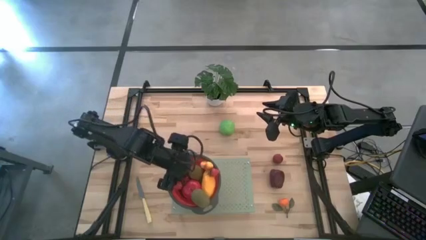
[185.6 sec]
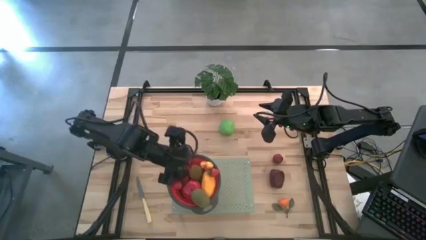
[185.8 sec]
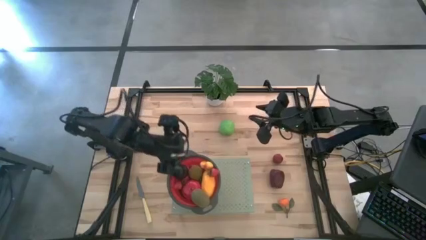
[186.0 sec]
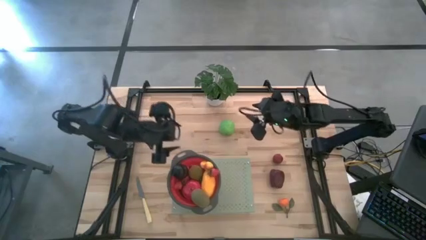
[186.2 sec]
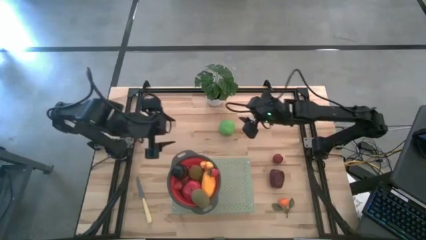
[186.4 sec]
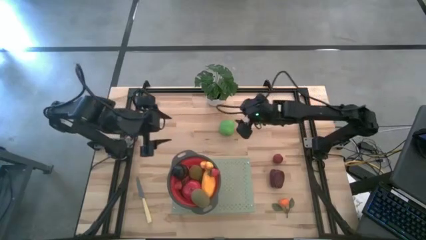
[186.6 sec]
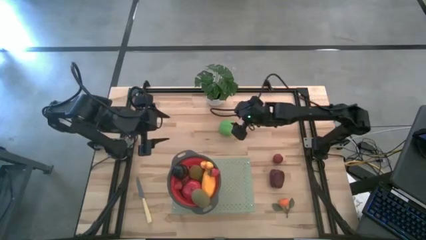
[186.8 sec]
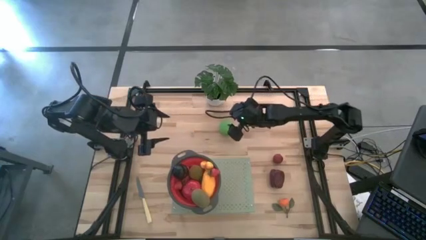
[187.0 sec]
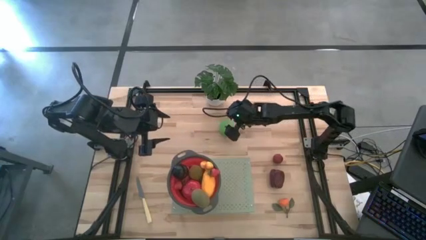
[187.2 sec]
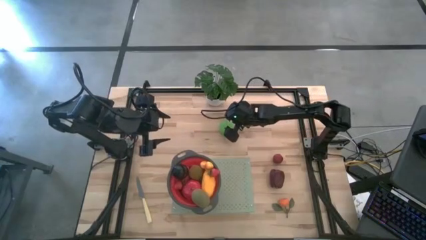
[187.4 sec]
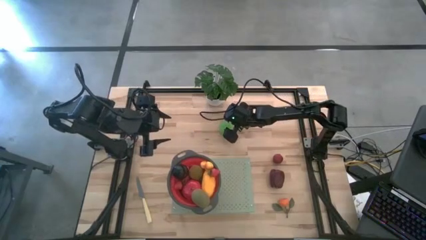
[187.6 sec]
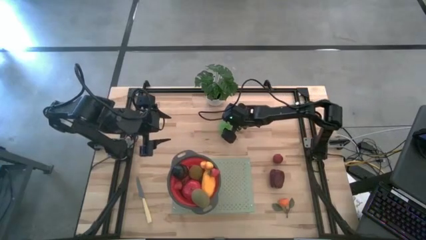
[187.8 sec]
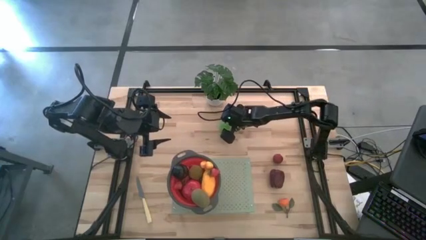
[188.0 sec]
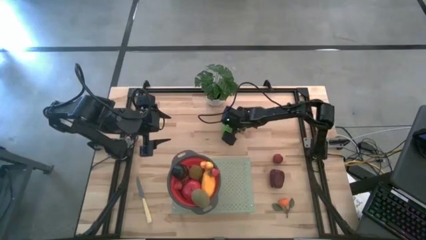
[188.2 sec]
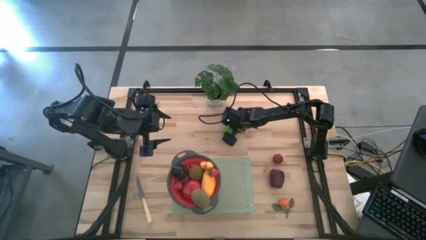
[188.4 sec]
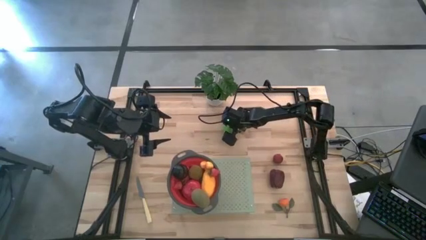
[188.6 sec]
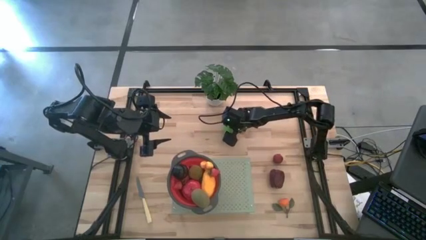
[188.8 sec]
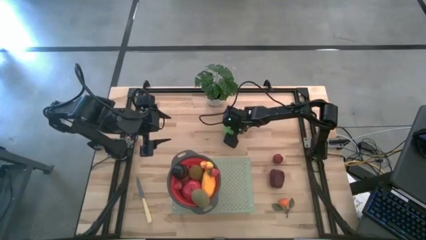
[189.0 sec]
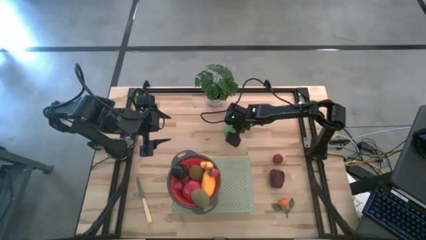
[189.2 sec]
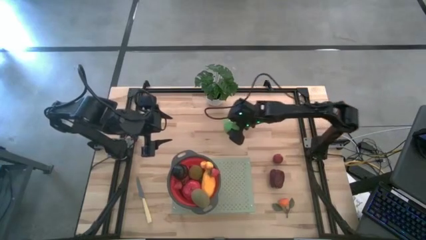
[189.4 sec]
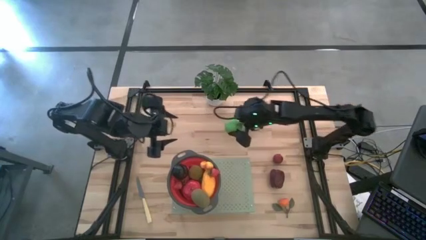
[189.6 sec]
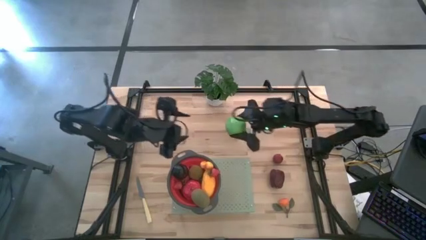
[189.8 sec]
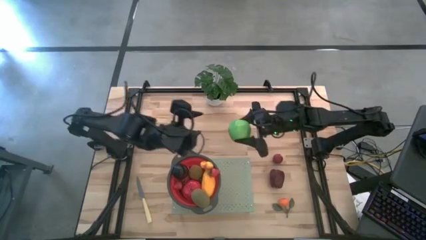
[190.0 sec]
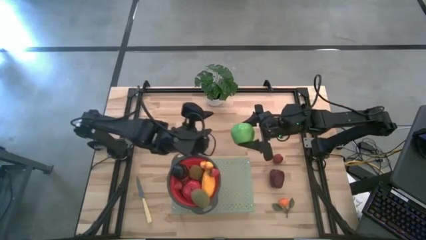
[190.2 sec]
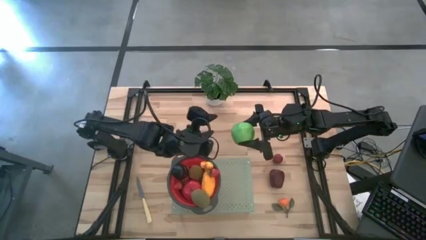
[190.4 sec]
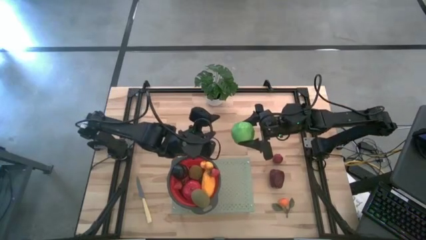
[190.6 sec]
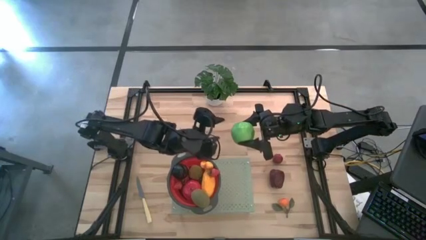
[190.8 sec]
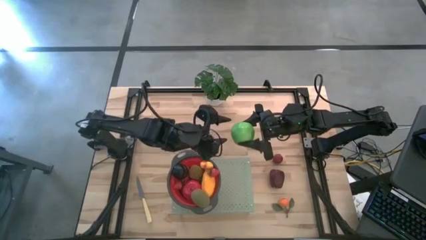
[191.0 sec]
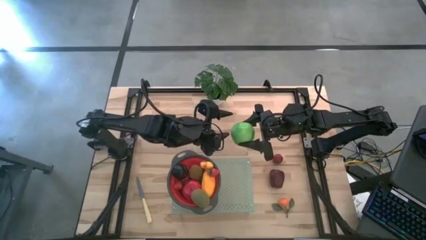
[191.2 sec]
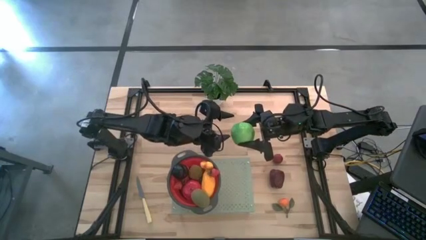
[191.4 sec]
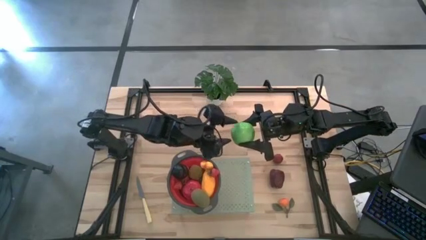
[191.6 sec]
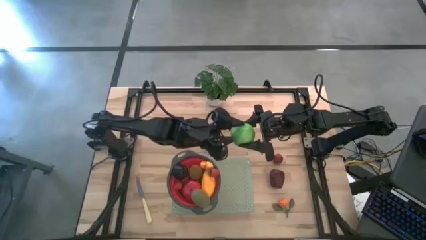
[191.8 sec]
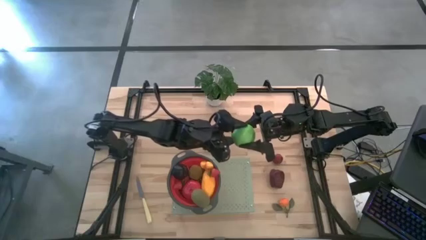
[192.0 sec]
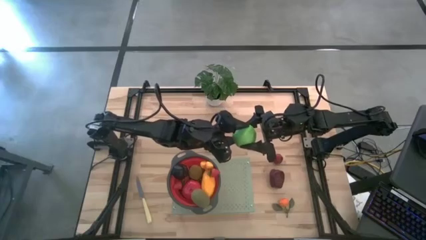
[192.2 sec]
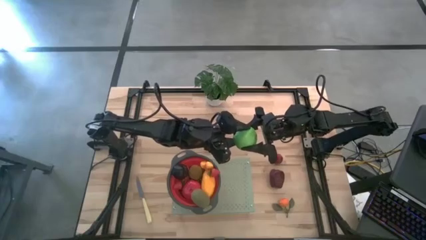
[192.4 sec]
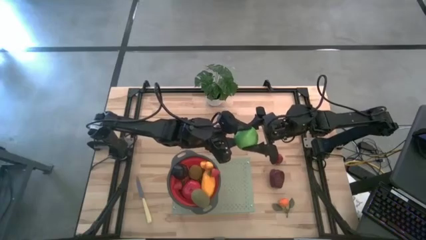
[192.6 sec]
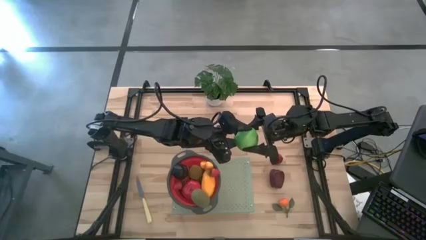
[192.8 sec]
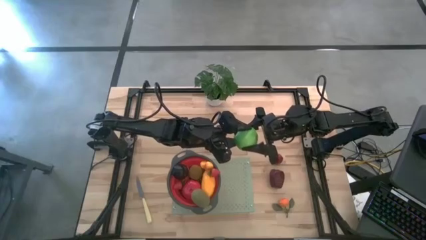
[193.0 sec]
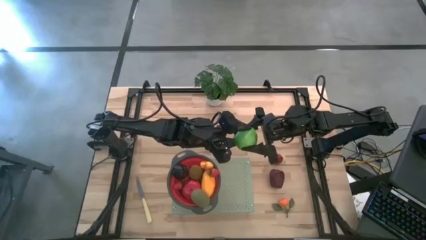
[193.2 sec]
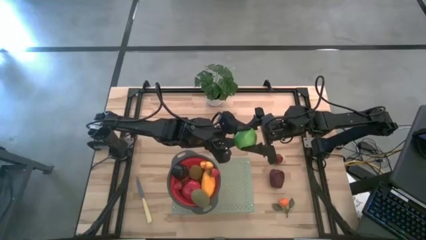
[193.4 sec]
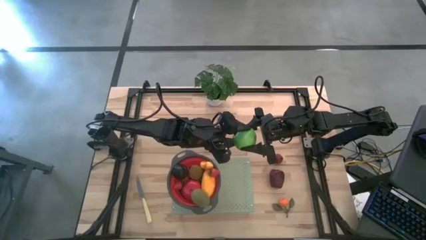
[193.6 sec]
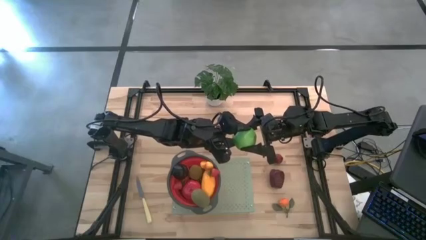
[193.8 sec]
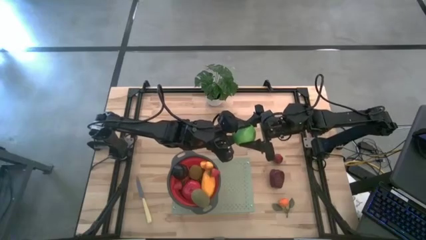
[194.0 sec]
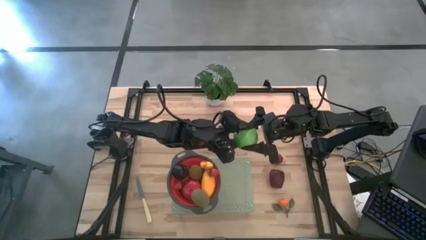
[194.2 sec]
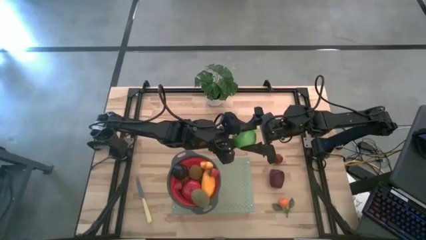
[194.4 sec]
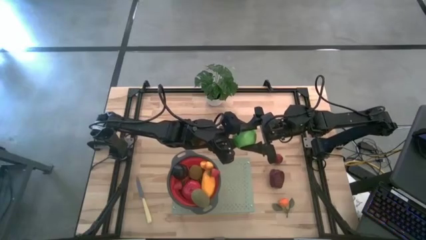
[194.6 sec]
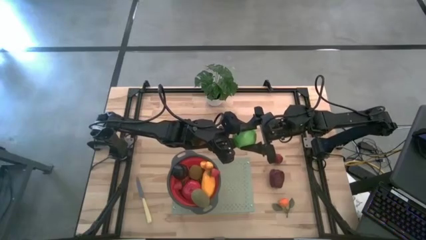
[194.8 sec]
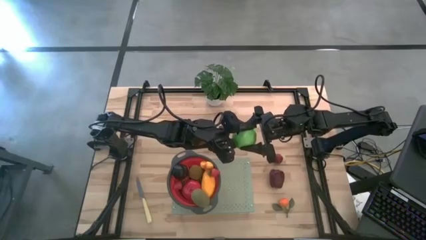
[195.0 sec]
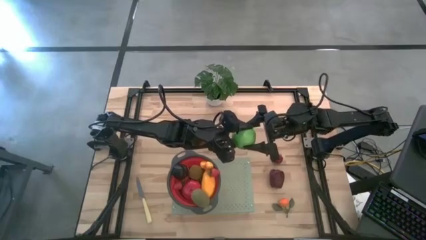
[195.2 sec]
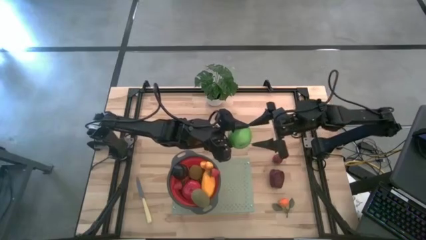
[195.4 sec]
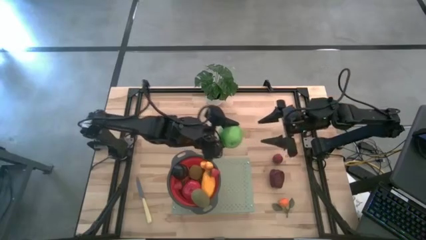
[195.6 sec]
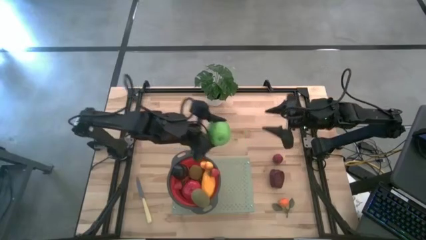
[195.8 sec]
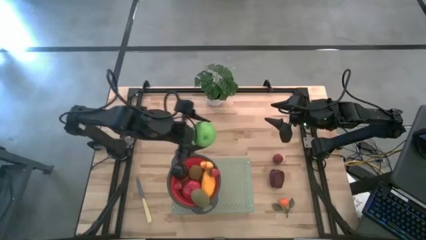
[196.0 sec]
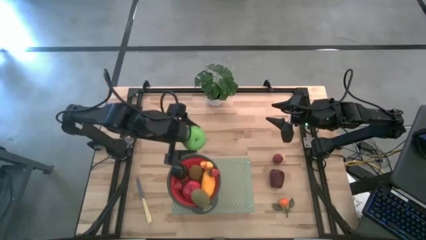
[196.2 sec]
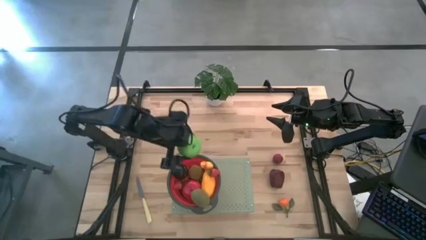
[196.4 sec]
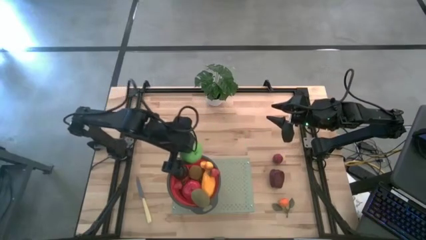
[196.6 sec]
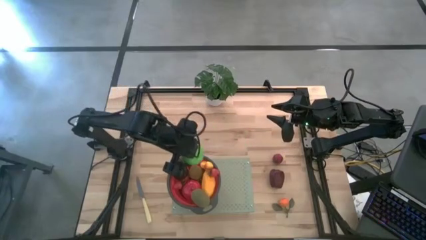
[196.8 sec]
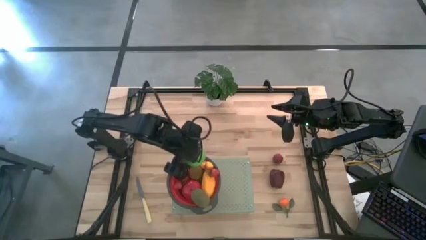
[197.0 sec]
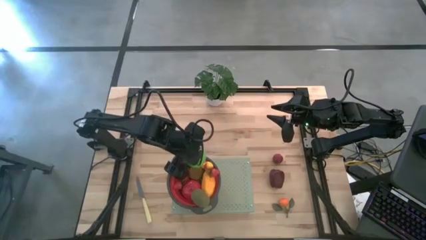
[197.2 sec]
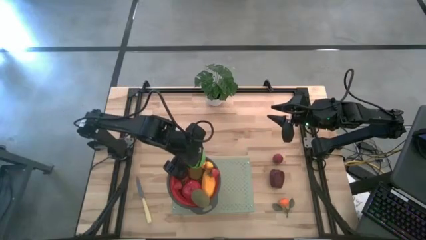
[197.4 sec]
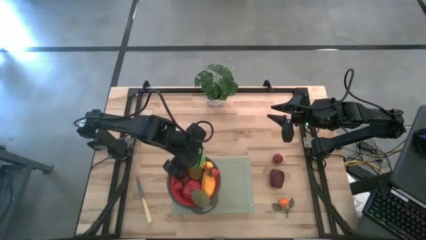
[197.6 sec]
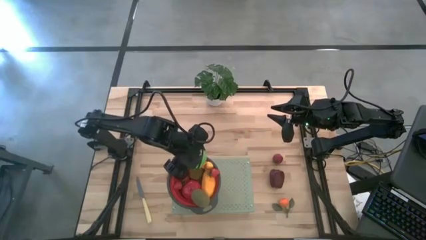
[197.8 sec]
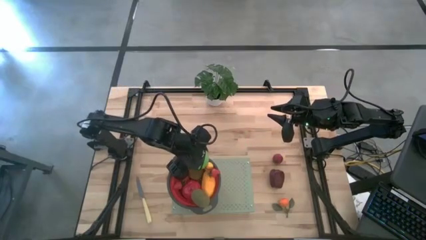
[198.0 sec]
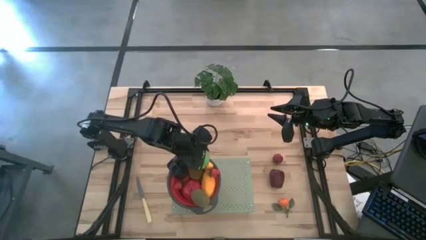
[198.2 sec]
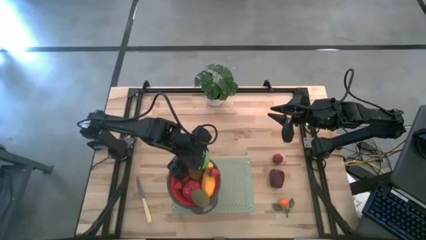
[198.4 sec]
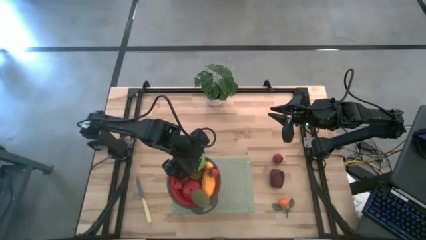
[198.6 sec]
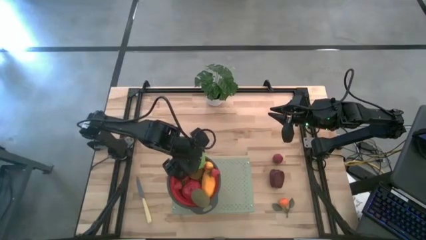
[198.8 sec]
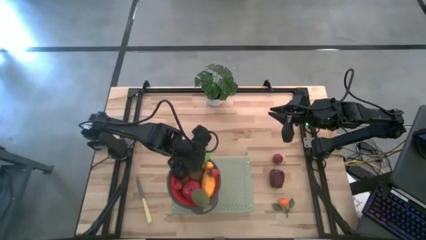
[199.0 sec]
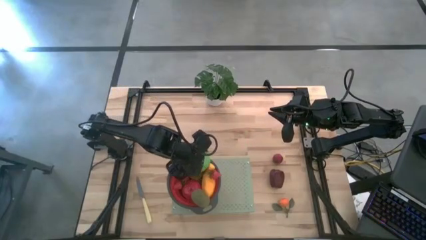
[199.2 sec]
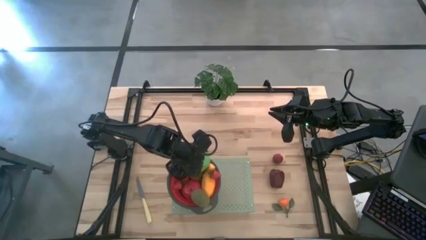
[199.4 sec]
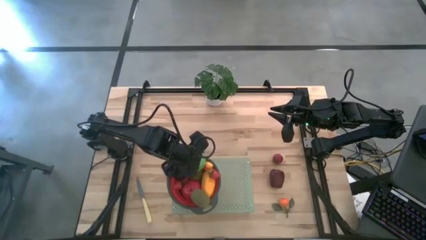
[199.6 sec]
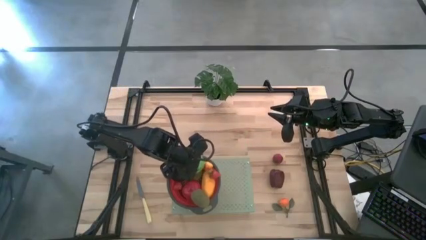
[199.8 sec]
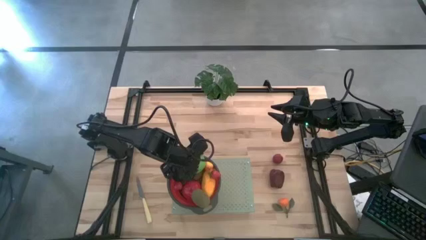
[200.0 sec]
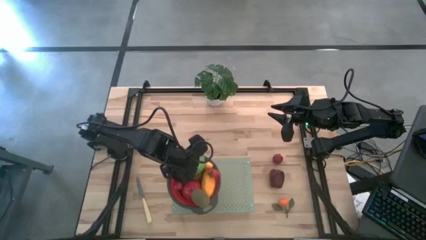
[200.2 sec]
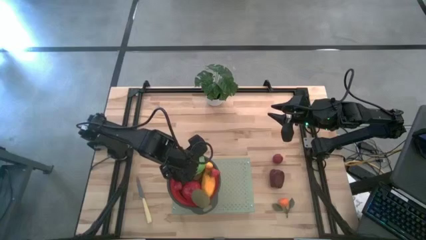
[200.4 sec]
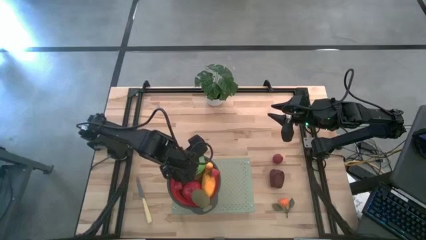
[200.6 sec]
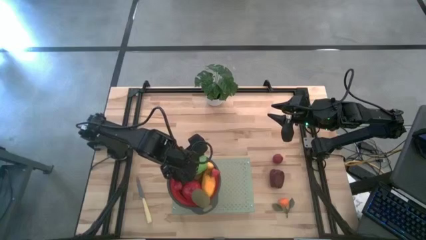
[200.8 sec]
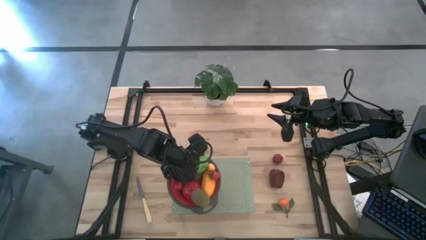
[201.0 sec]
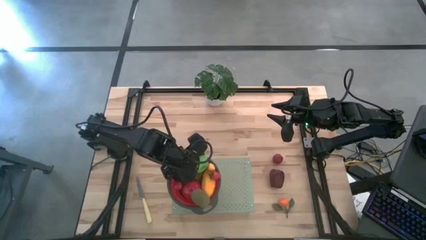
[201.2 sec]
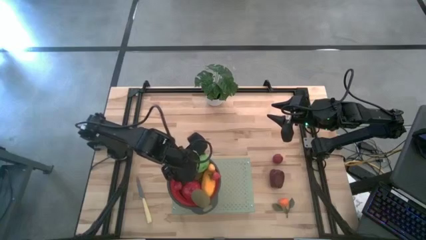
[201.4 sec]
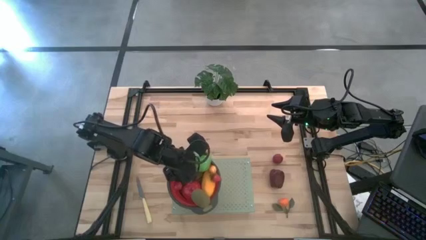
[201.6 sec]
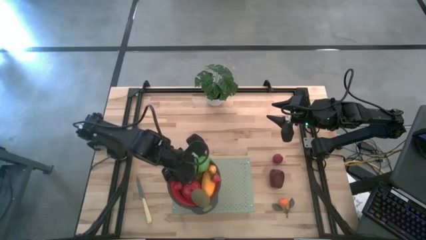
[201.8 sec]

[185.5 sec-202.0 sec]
Task: Pick & Place Fruit
Put the green apple into the red strainer
